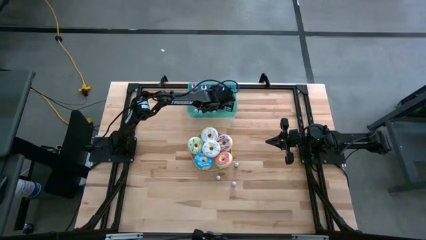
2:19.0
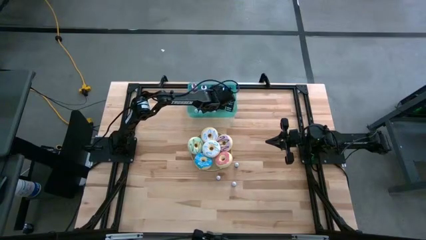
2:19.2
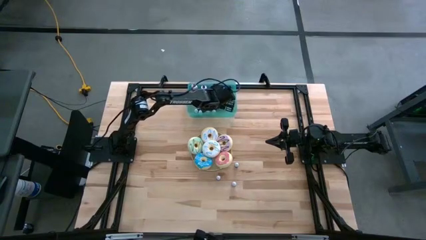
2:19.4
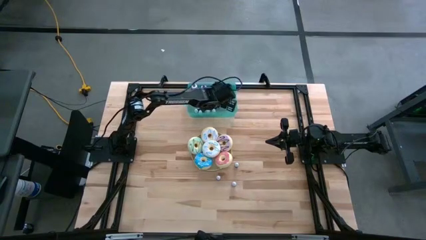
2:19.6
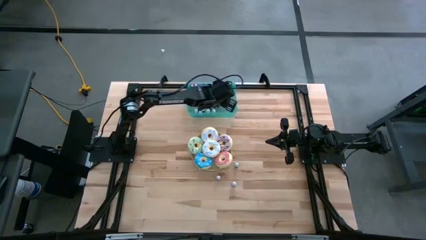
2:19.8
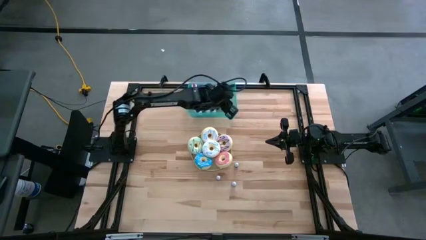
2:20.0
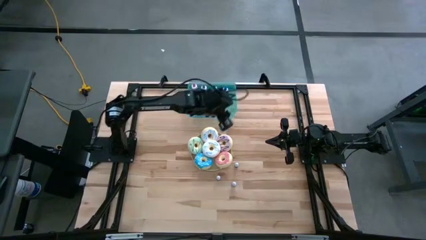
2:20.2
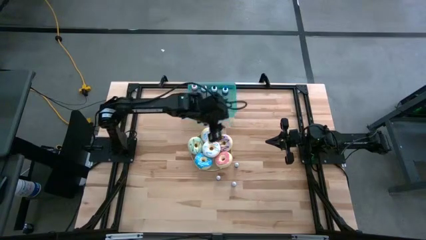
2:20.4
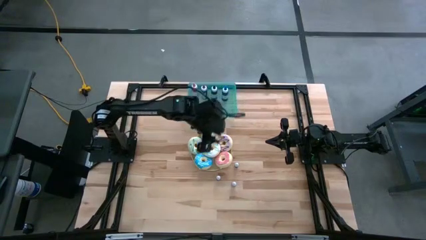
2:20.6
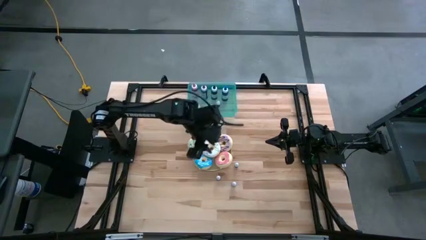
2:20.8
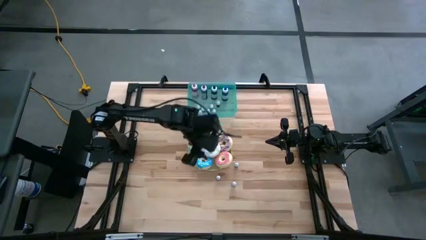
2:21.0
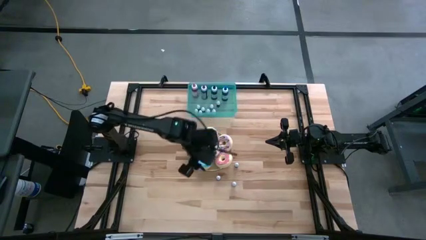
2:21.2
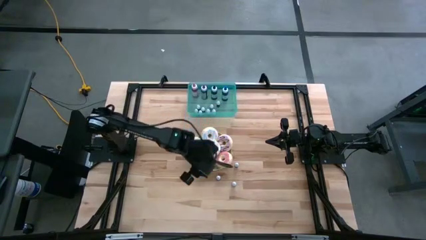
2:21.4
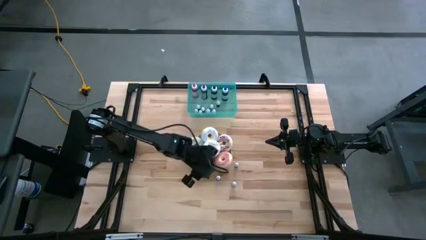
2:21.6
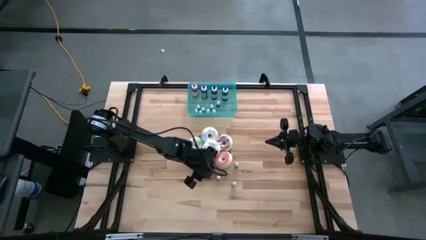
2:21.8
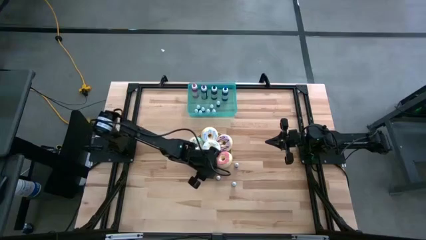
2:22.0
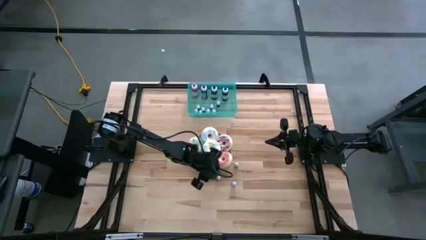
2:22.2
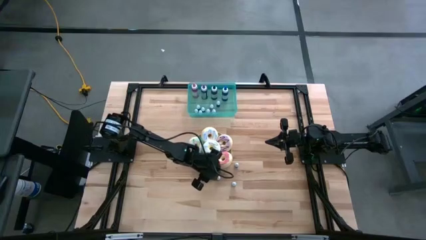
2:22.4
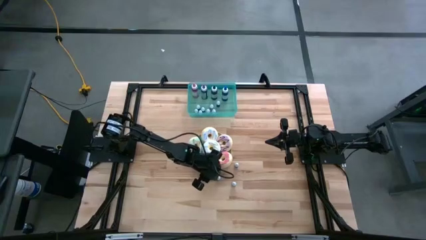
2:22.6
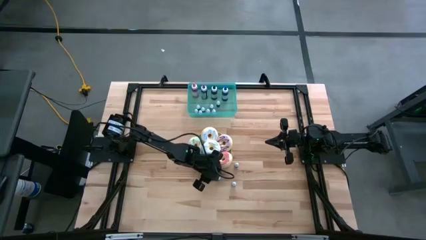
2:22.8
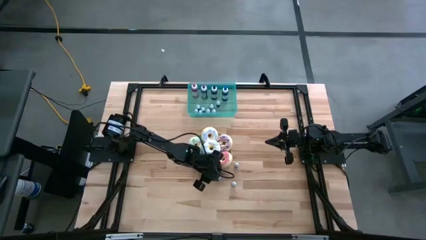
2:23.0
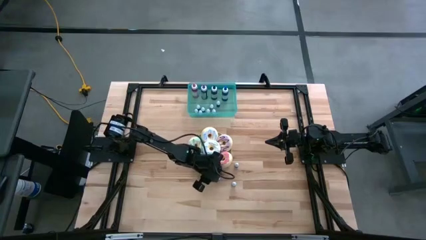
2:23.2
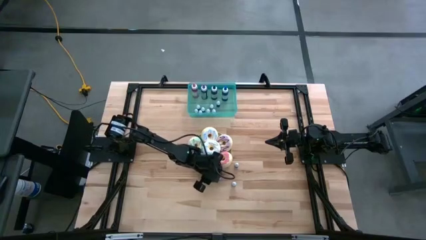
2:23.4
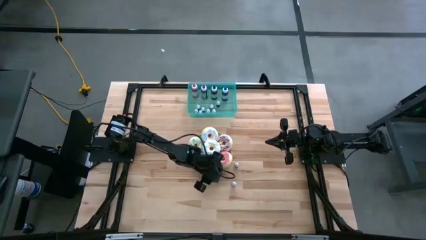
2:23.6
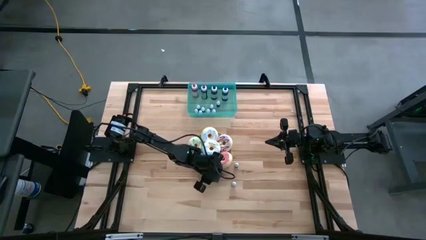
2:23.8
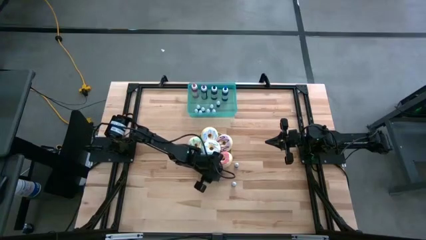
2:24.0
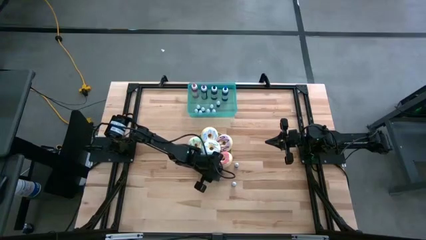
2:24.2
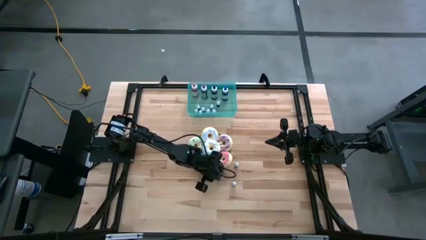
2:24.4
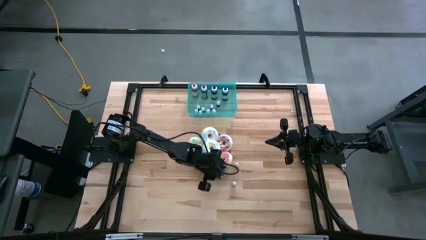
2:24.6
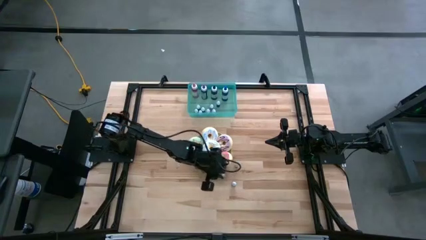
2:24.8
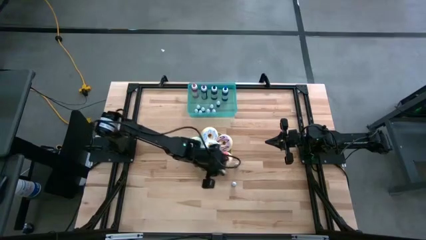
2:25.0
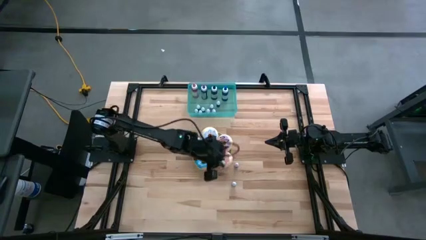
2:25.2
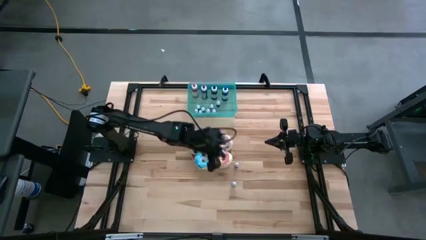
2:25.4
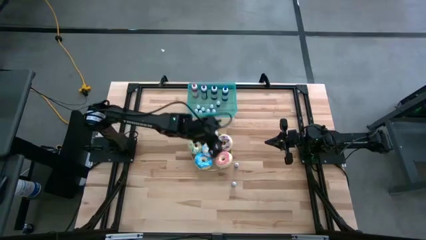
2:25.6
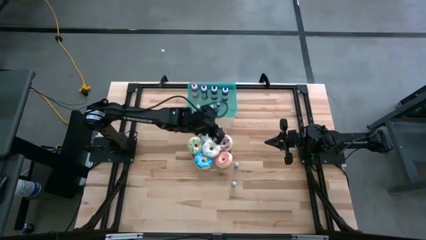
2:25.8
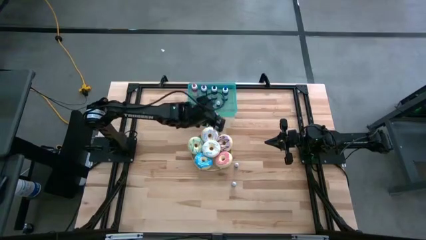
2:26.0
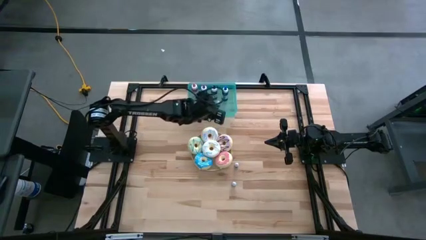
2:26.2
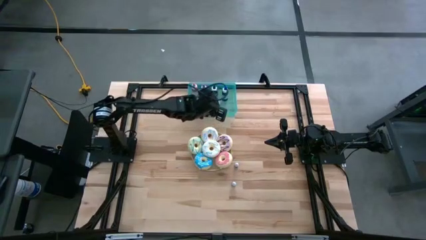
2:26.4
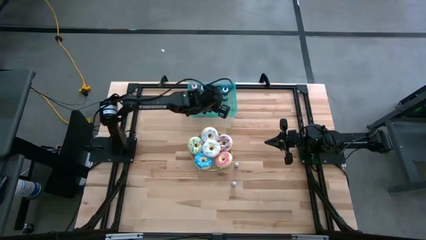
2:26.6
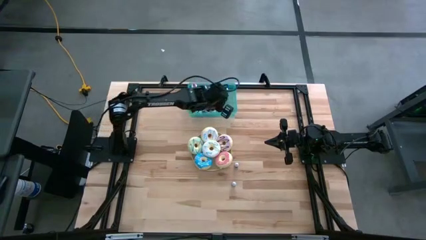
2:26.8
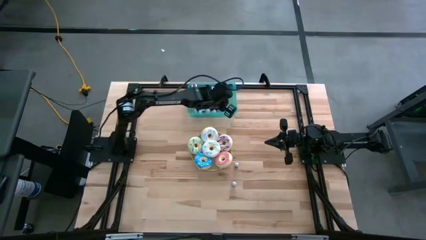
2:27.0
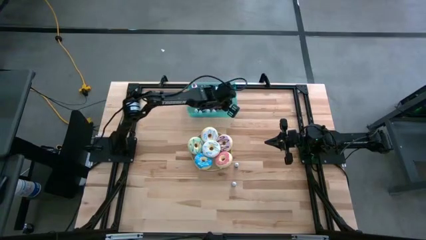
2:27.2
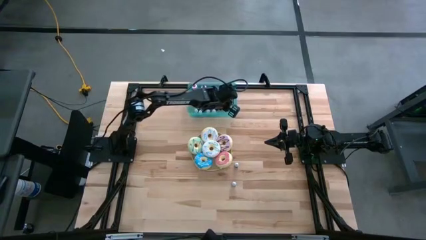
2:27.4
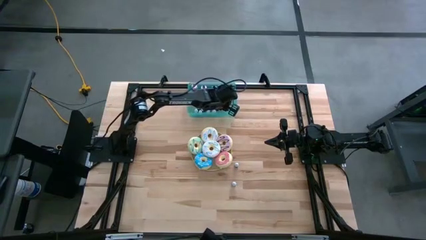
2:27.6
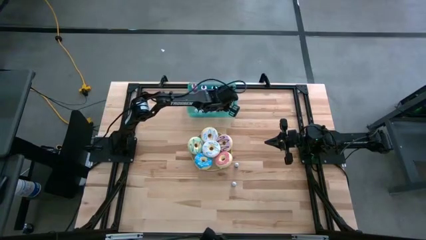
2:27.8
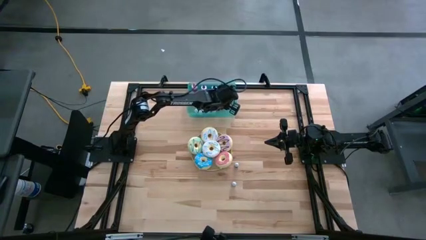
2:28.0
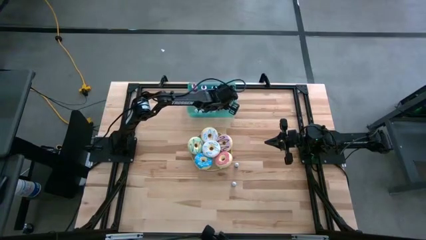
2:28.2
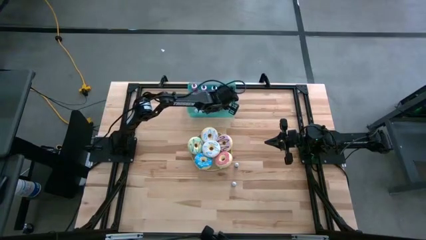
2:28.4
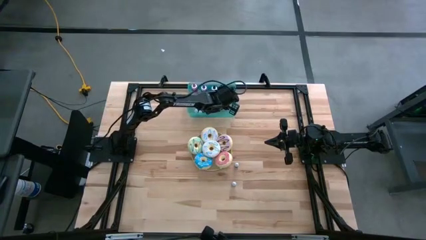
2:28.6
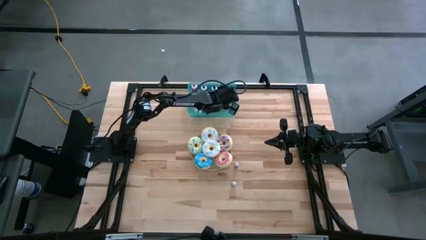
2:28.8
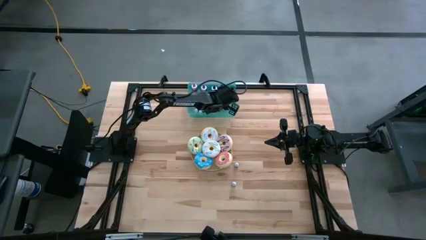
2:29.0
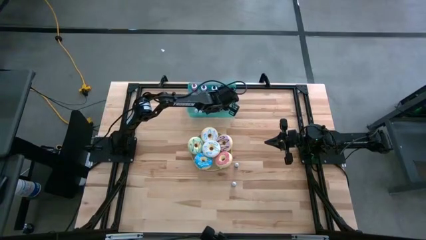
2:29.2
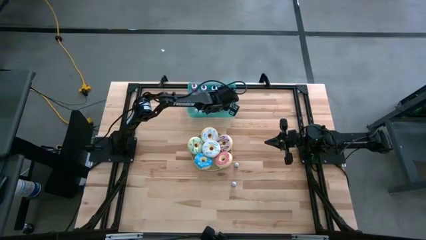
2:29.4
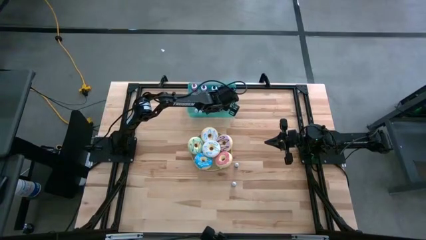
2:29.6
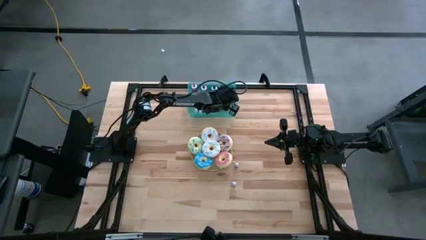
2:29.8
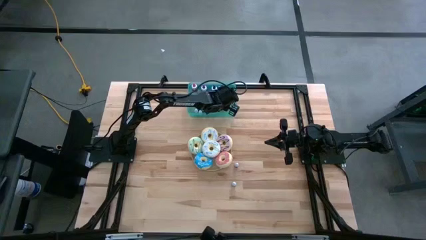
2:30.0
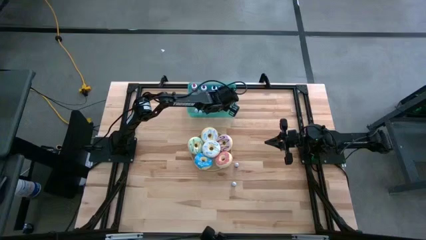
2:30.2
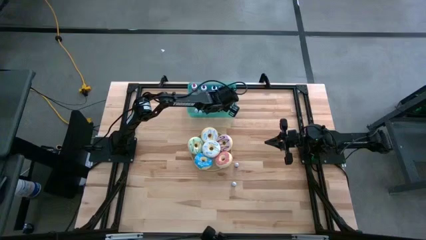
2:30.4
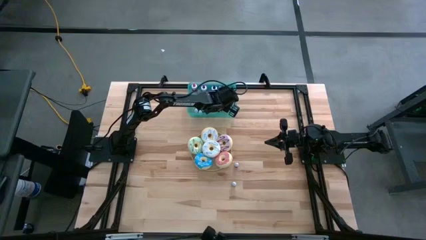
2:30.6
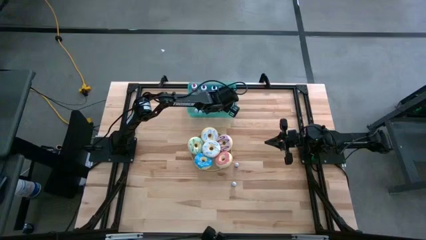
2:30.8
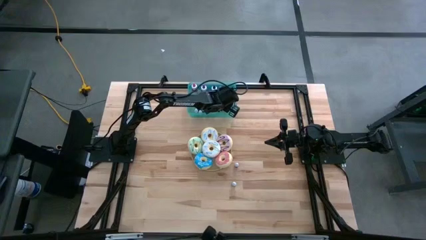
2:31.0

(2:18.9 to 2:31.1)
Task: Pick & Place food coloring
Put the bottom small red food coloring bottle into the green container

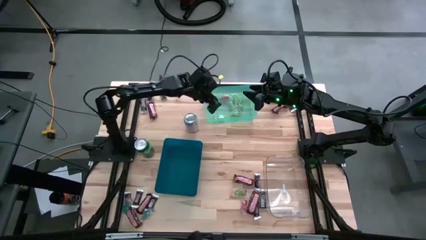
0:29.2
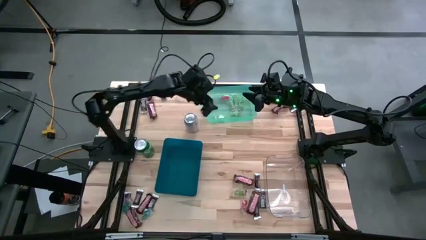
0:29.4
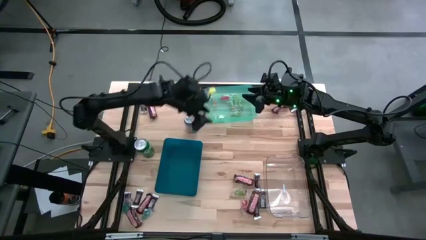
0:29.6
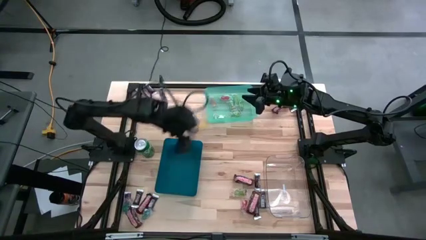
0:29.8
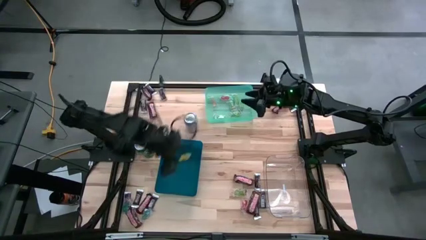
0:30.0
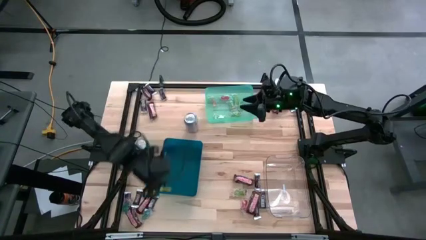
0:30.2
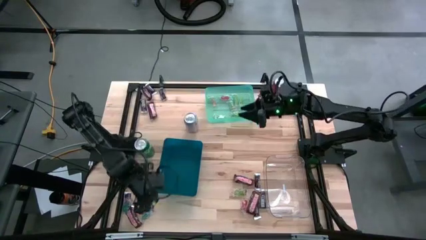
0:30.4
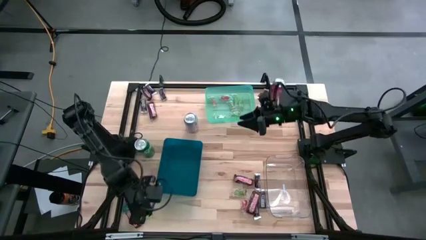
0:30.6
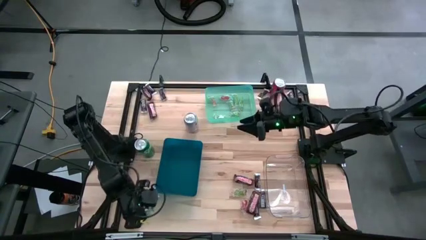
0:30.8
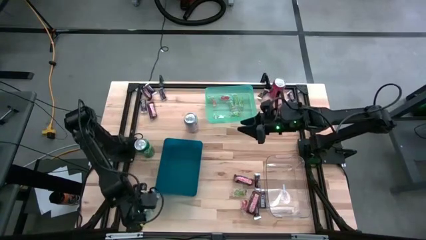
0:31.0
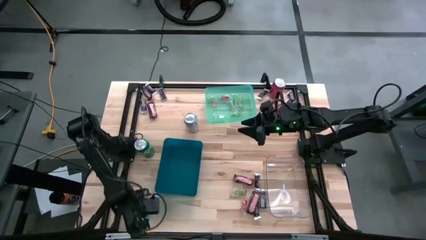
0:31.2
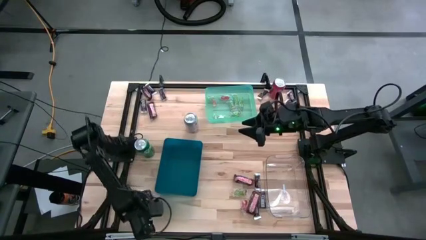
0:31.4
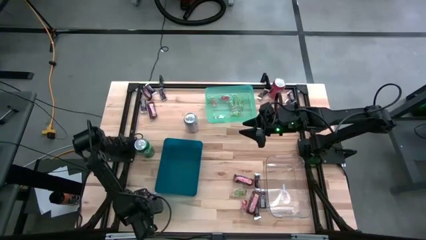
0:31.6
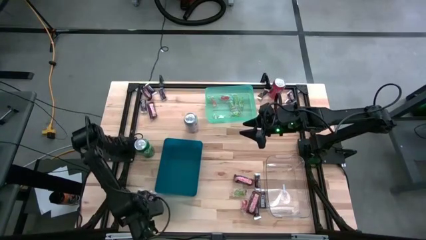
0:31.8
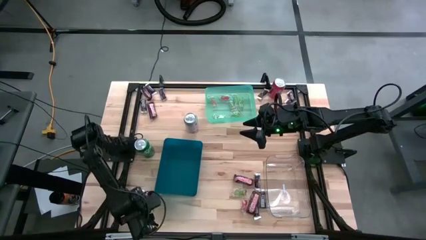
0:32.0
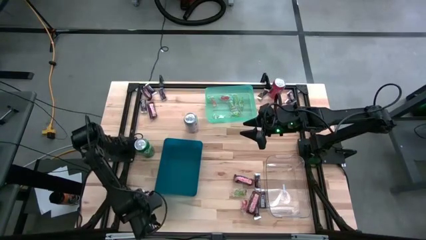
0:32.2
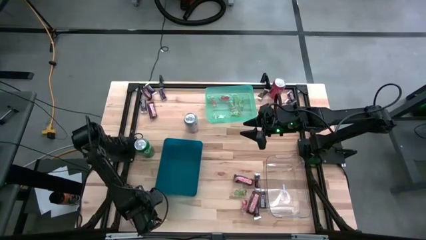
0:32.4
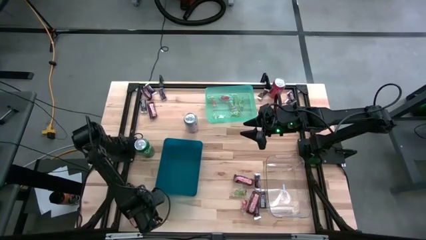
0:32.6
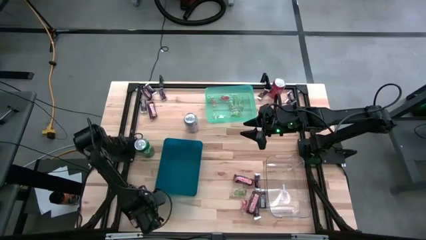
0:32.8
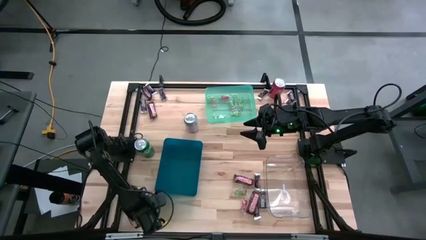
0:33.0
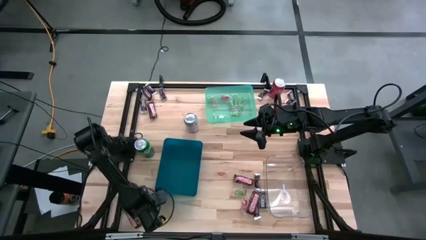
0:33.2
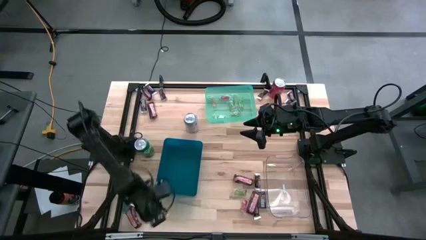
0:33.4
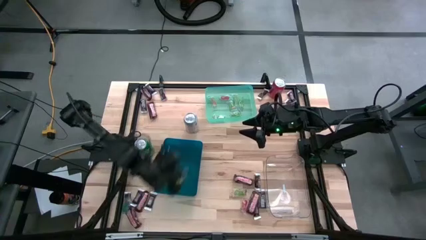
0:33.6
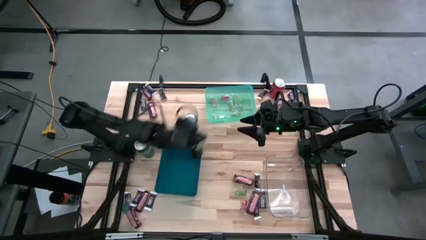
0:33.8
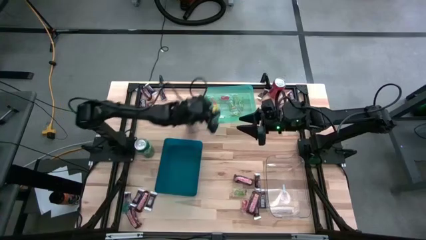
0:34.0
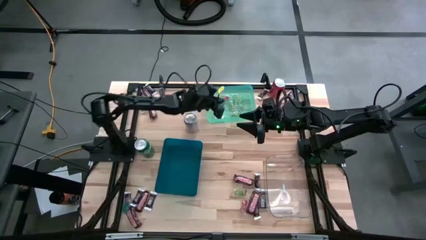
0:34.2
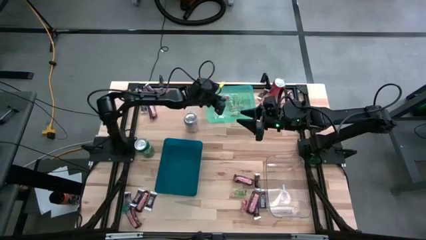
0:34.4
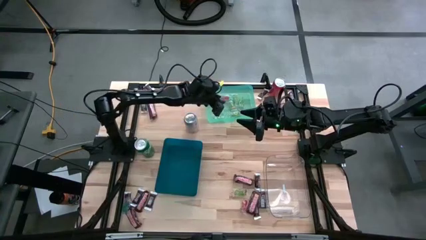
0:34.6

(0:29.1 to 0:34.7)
Task: Organize candy in baskets
Put the transparent gummy into the green bin
